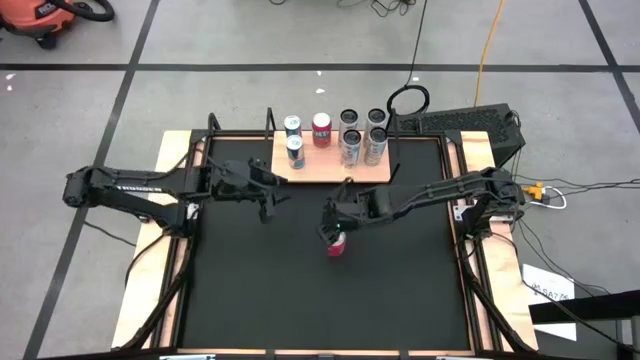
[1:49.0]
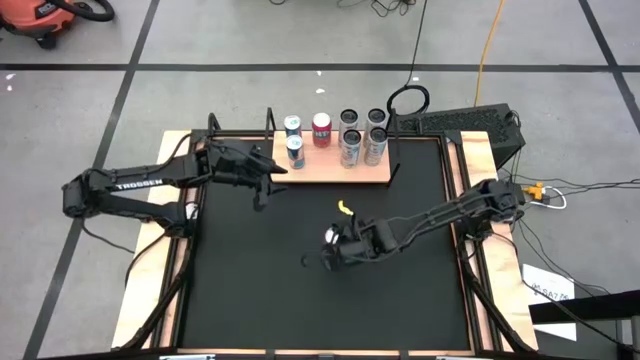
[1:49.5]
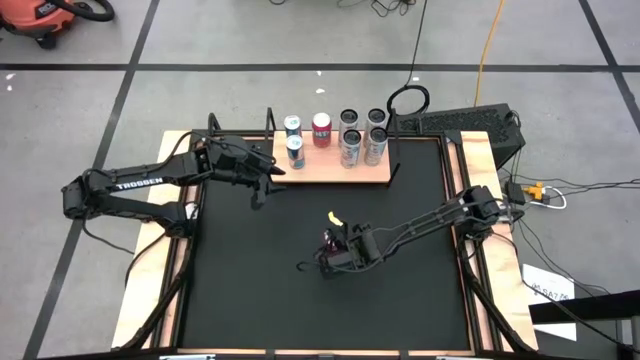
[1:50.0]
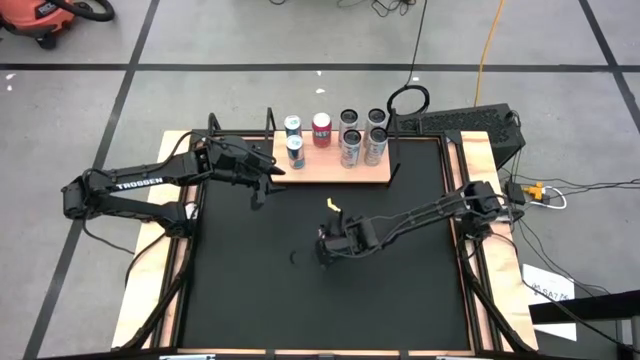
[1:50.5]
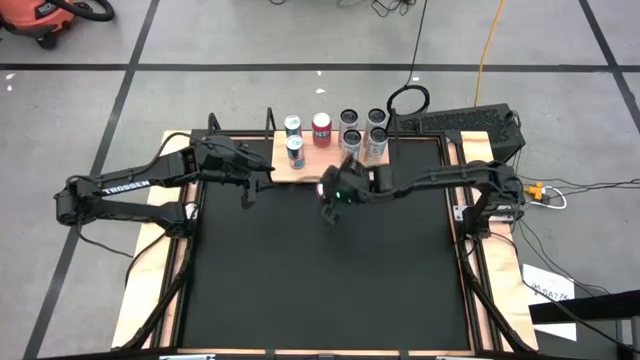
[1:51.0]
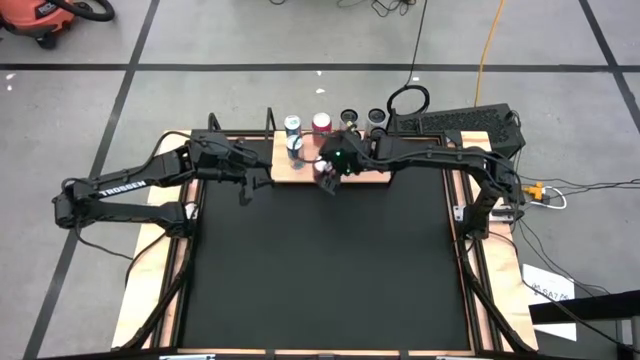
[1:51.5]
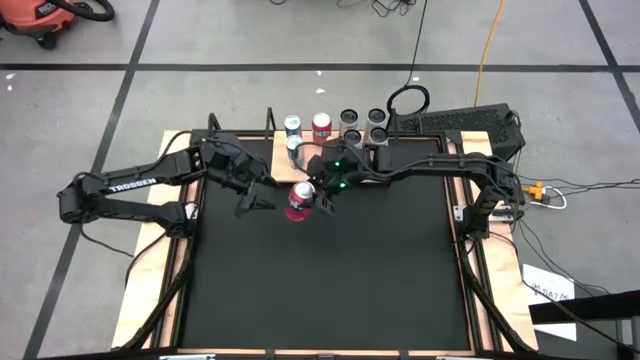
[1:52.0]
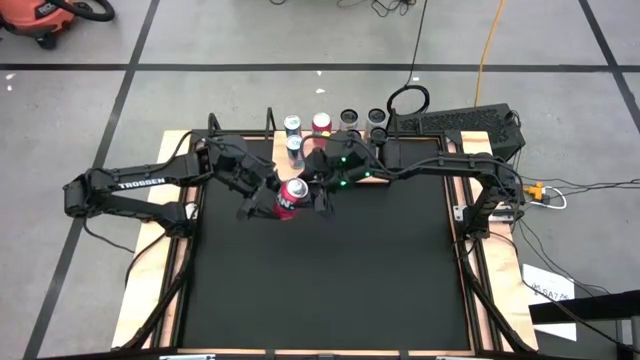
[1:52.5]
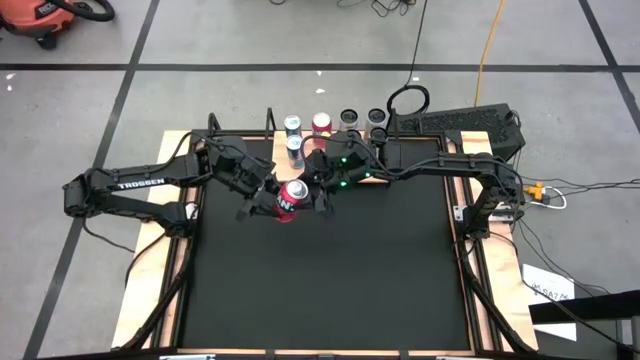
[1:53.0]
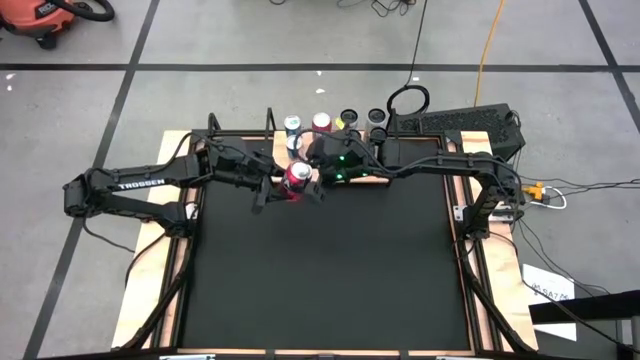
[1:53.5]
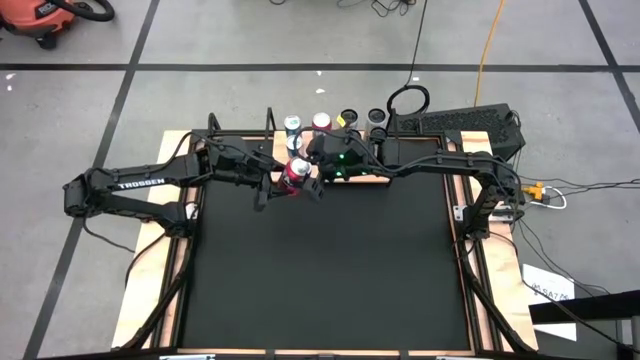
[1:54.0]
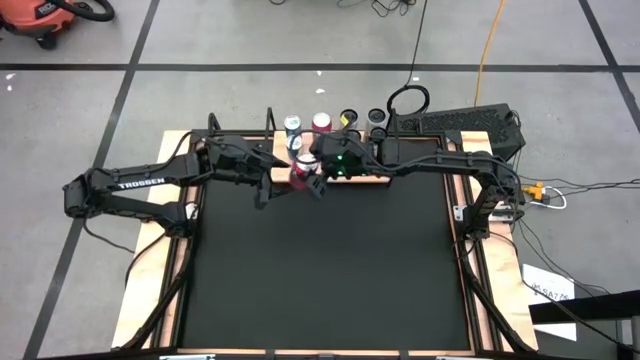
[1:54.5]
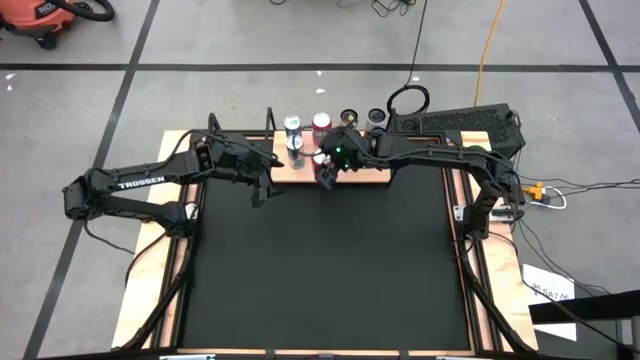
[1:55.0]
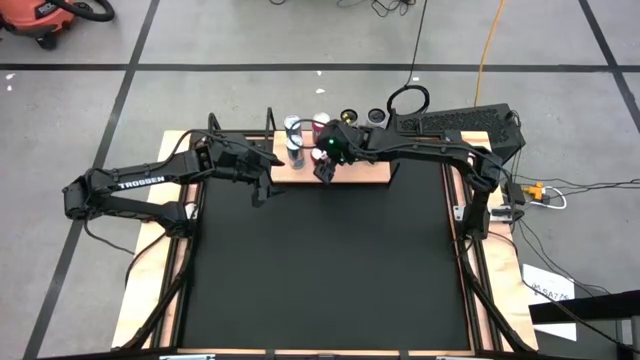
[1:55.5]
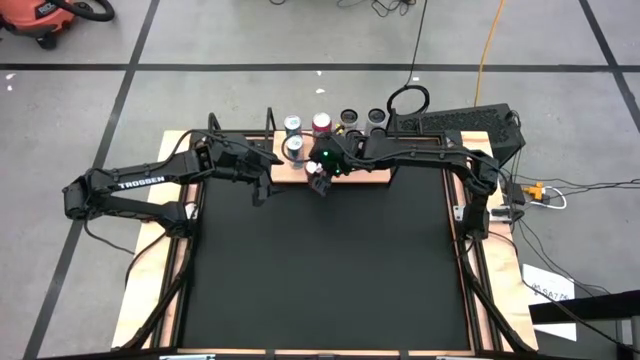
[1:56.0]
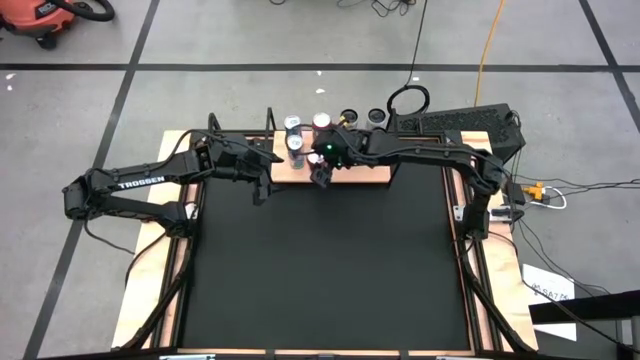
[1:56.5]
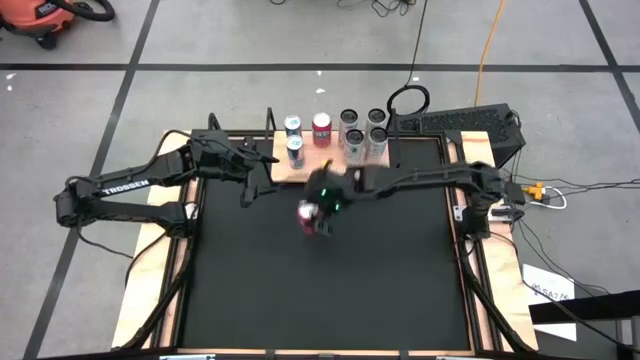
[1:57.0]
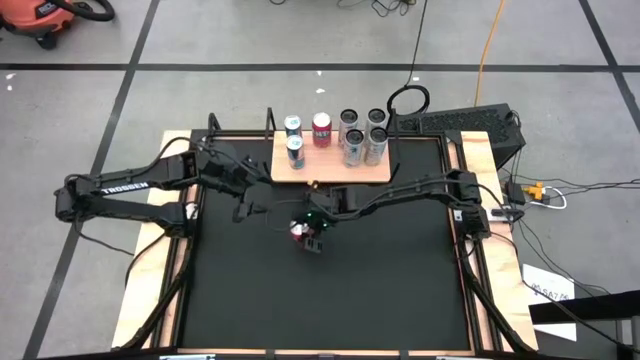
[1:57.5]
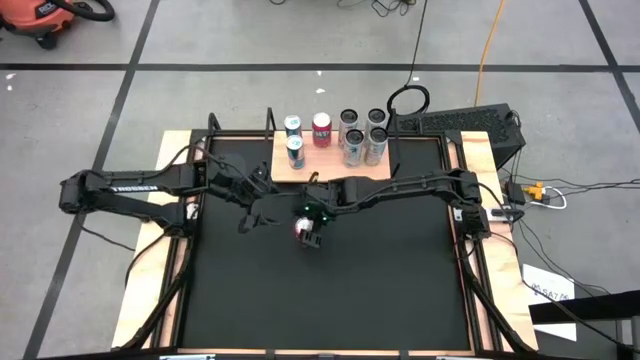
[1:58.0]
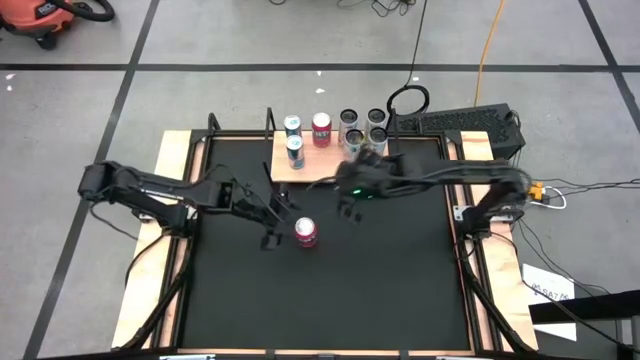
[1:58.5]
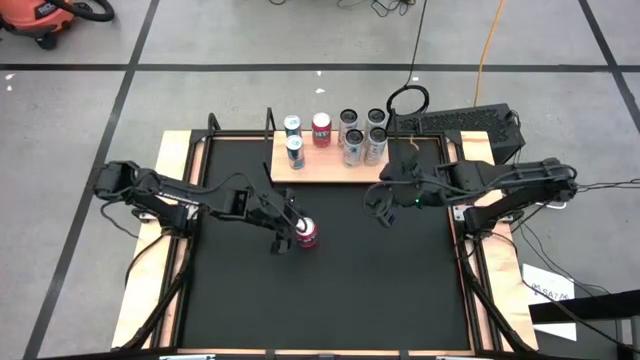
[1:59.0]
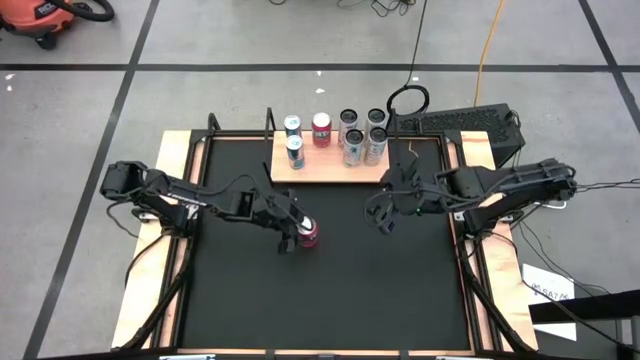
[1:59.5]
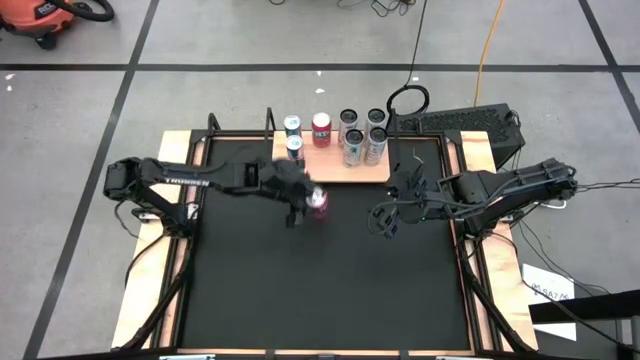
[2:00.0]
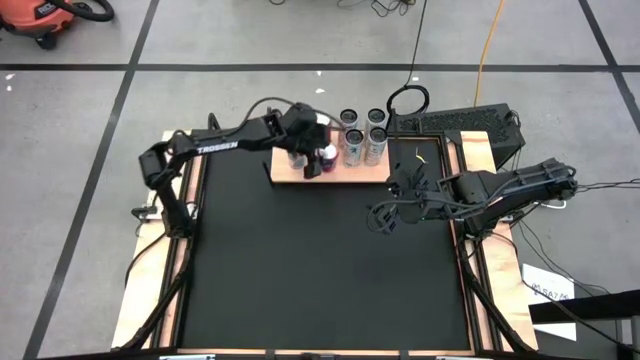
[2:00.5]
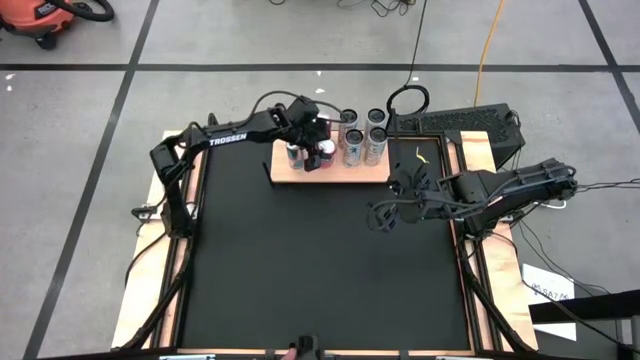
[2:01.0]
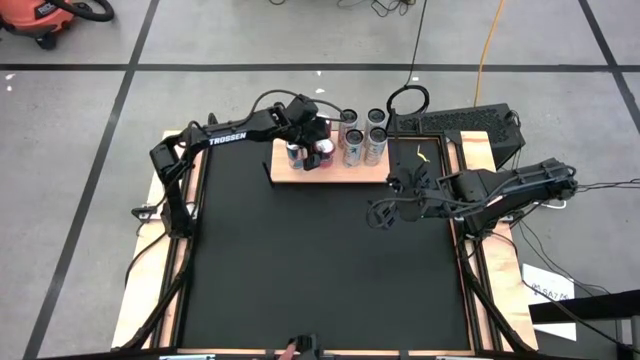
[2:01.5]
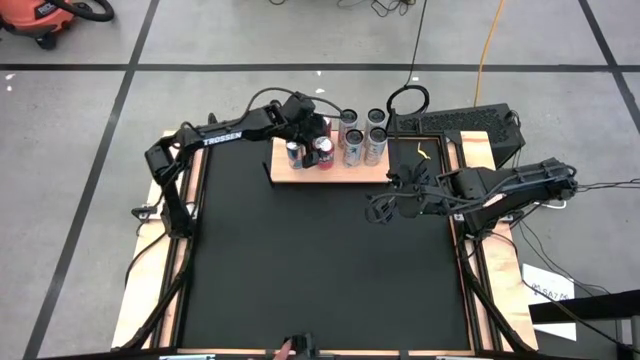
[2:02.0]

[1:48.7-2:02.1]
Task: Place canned beverage on shelf
Put the orange soda can on the shelf aligned with the other orange soda can

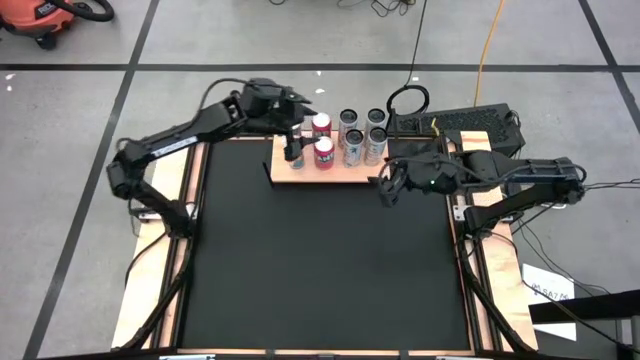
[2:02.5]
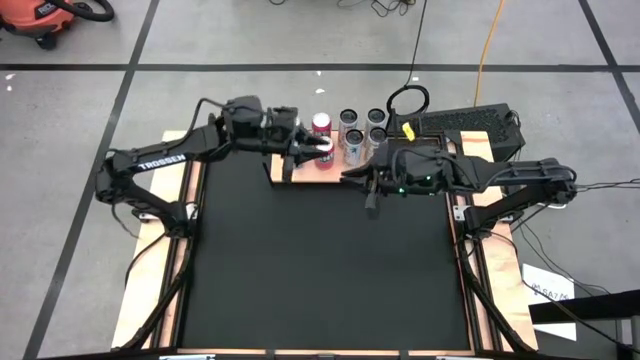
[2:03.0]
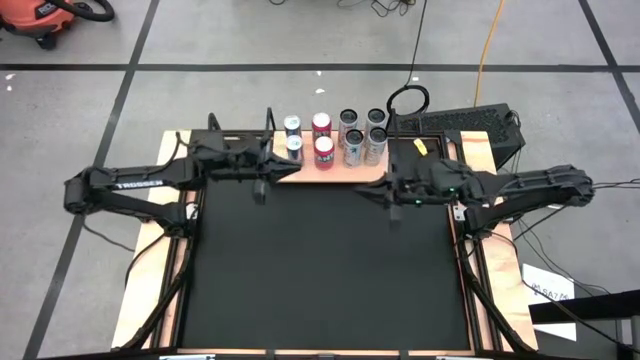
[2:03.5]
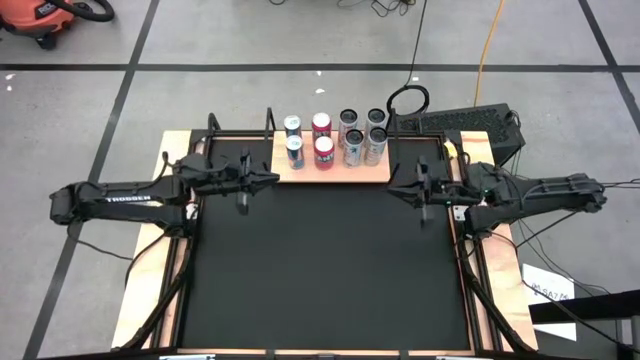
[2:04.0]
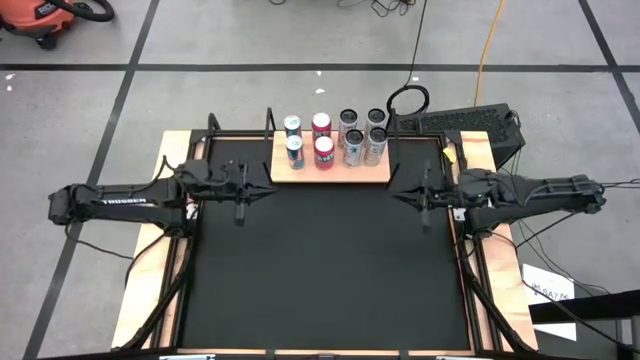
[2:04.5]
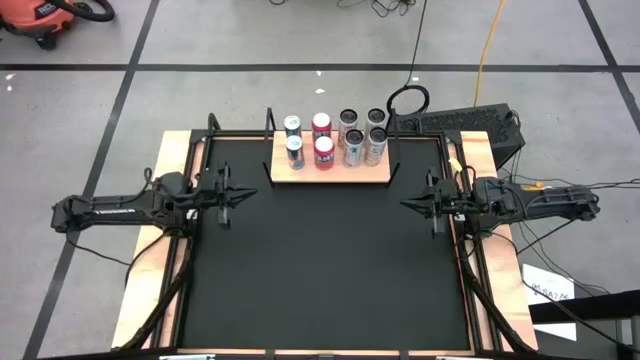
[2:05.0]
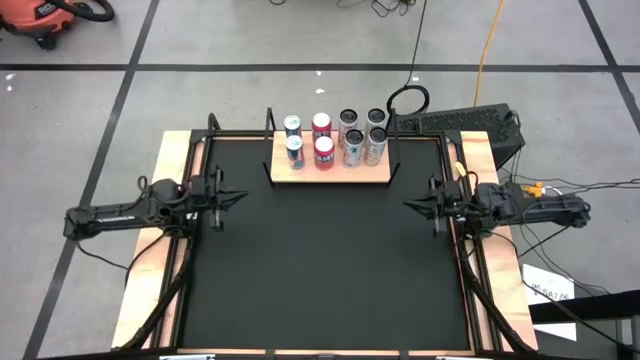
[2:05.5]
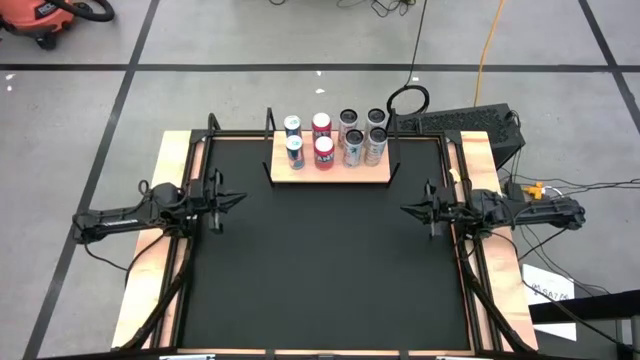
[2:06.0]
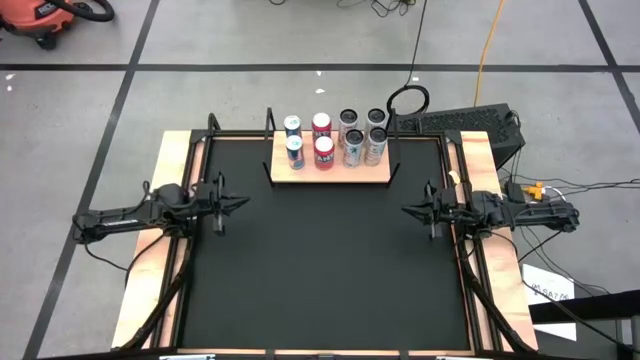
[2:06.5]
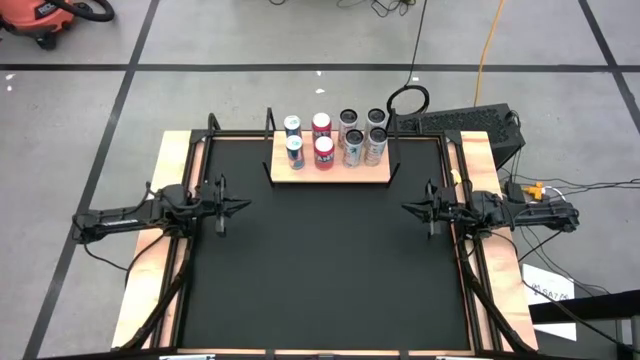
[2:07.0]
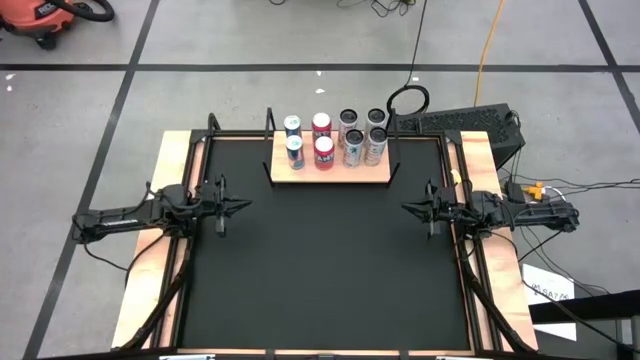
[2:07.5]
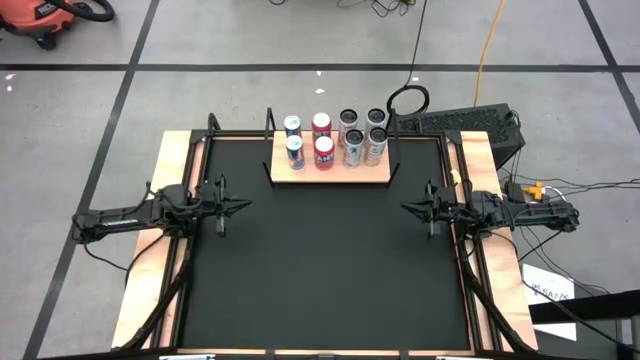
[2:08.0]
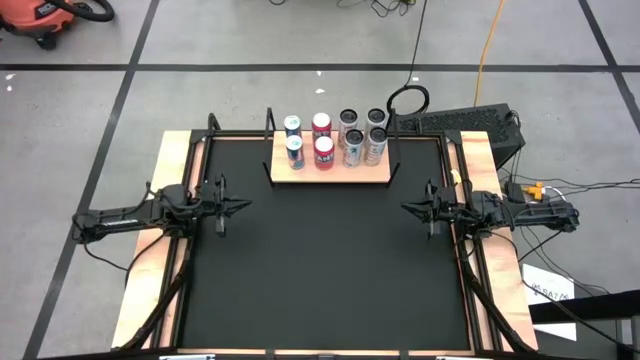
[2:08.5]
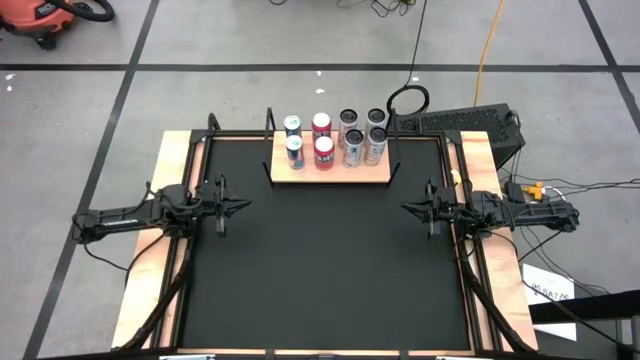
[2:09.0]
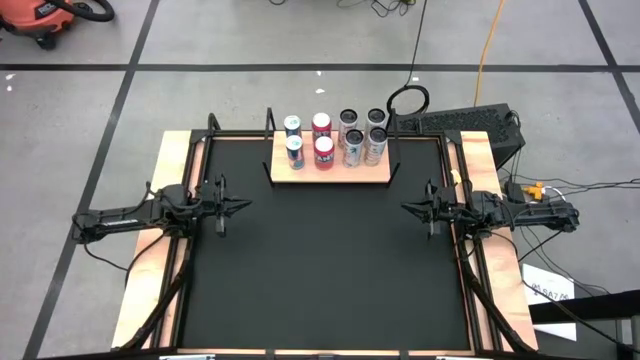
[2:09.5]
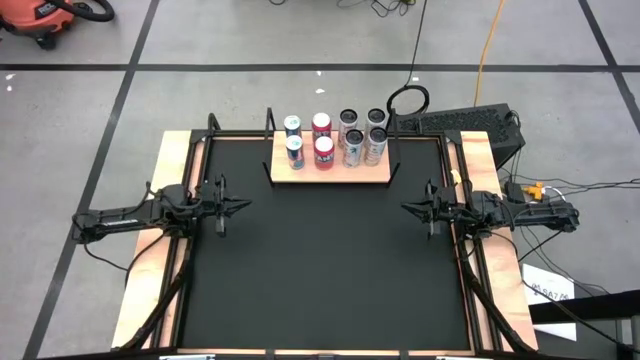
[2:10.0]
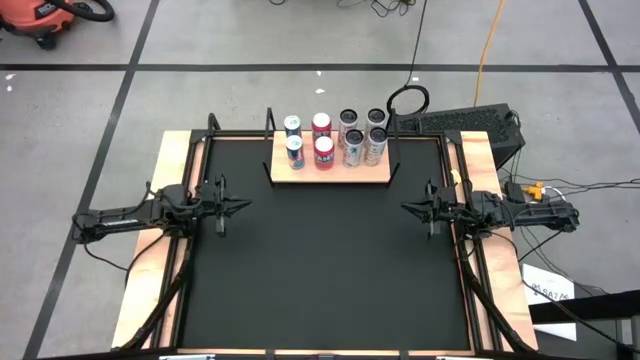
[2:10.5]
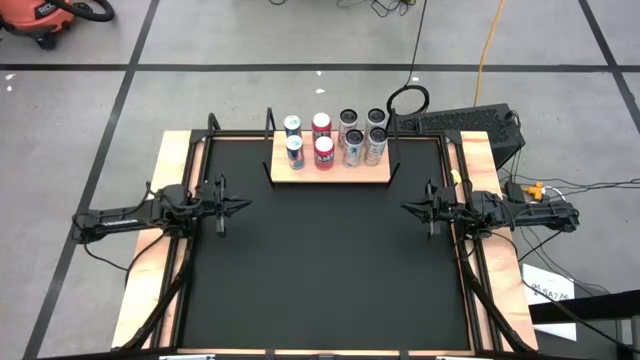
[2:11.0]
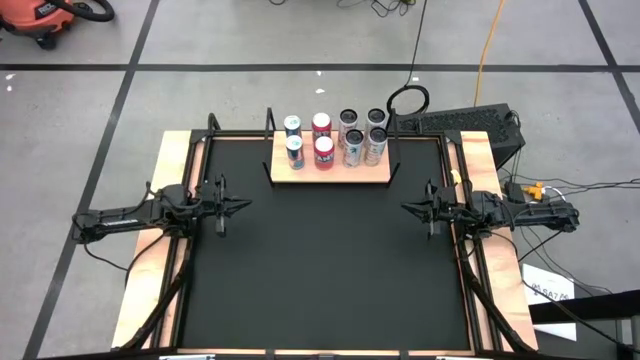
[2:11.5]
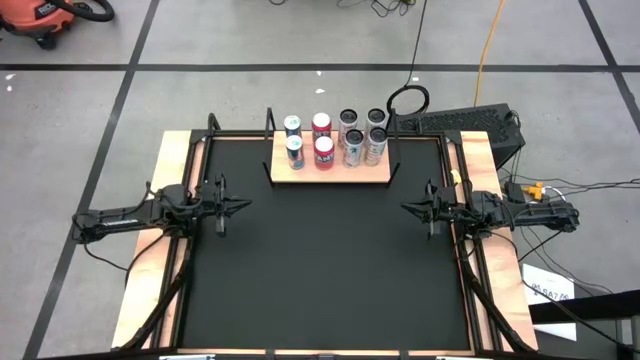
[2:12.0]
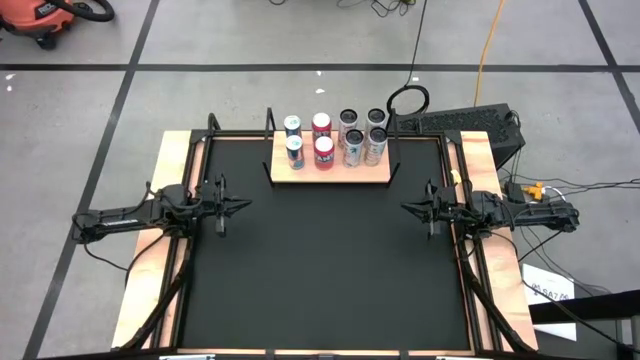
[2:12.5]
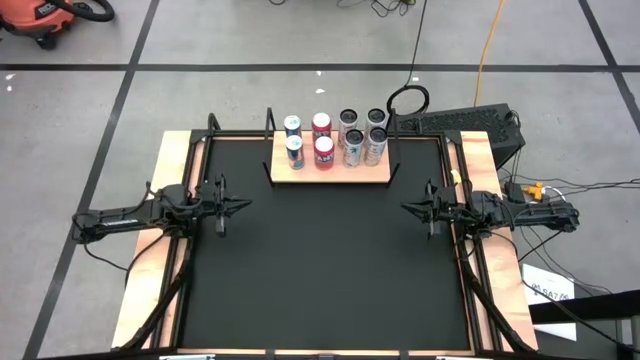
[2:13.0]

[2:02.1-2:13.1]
Return to Home Position
